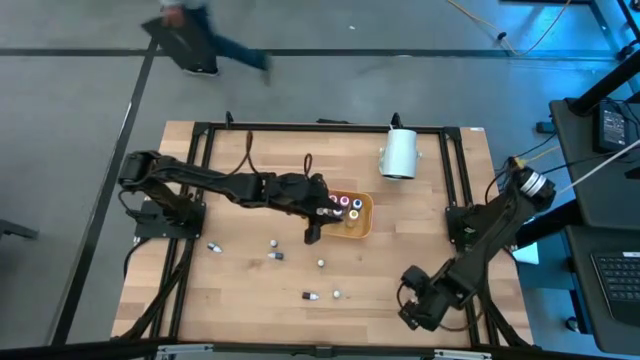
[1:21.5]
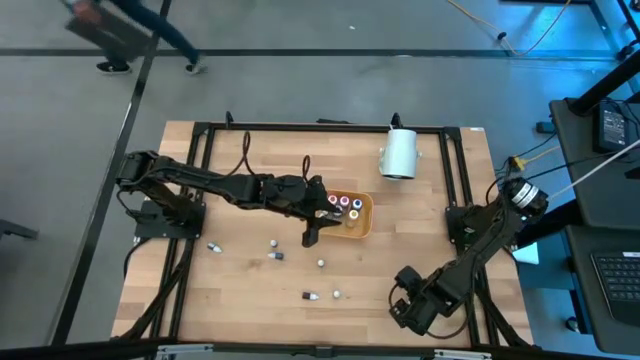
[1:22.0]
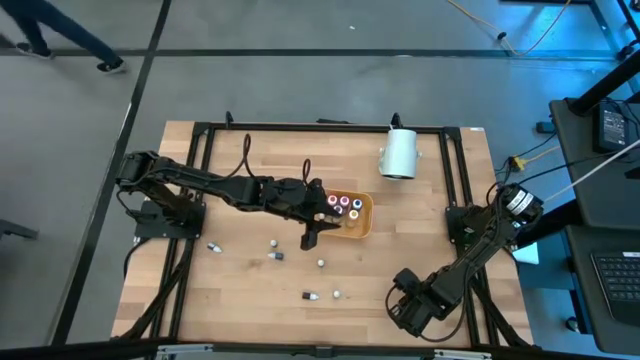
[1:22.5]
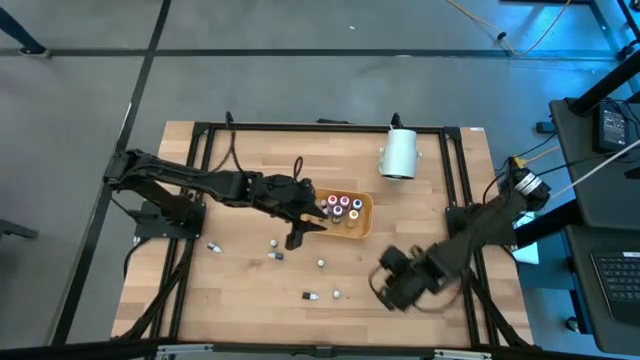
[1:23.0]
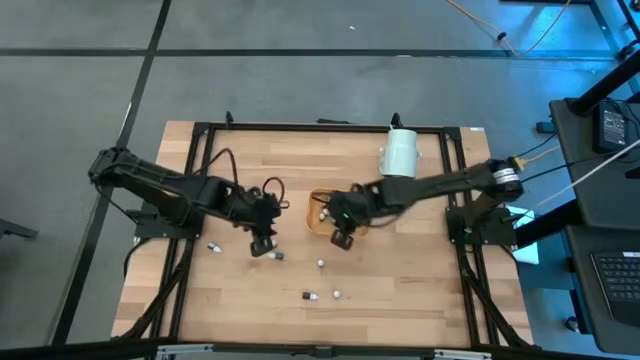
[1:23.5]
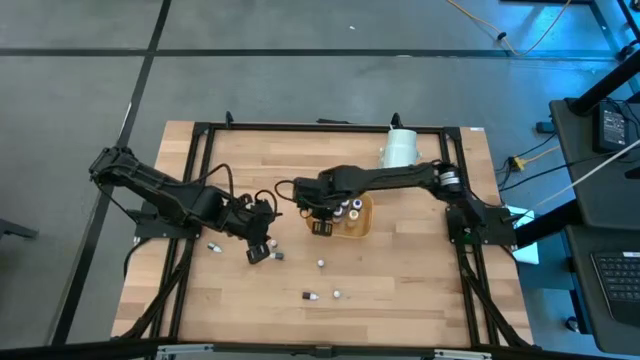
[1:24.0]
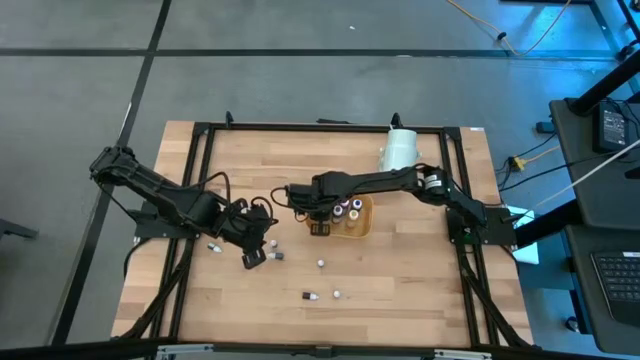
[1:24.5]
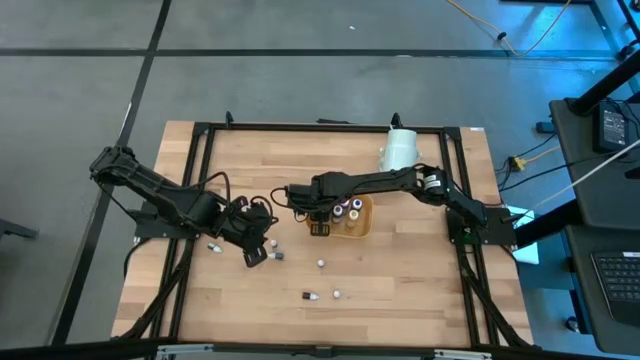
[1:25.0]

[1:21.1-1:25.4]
Task: Pick & Place food coloring
Put the small green food coloring bottle into the yellow bin

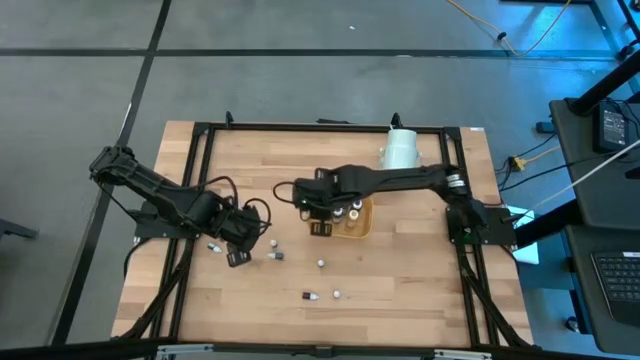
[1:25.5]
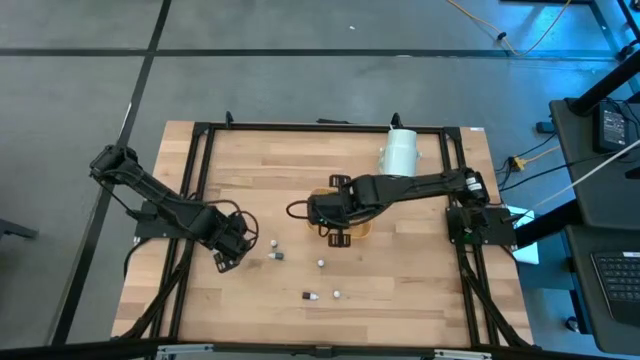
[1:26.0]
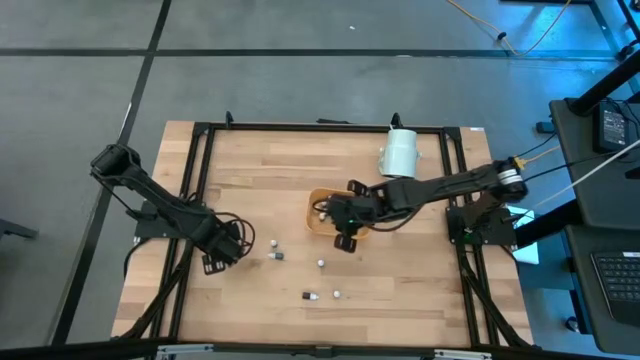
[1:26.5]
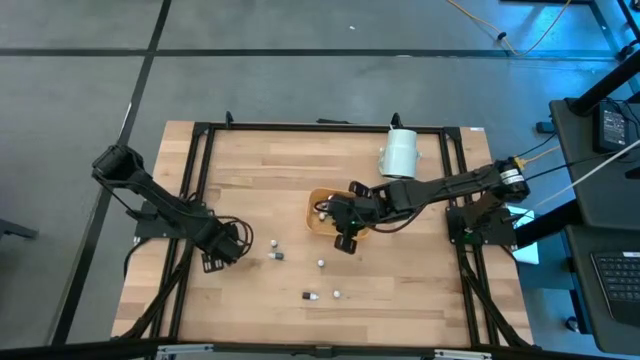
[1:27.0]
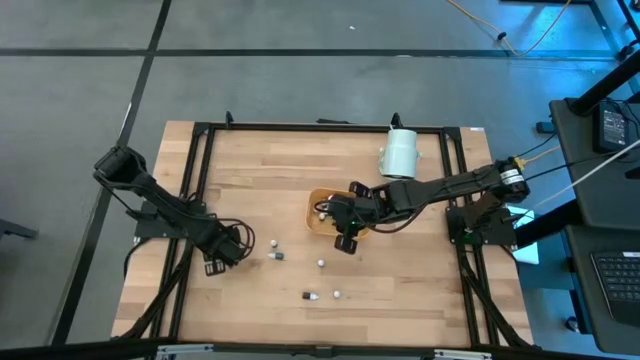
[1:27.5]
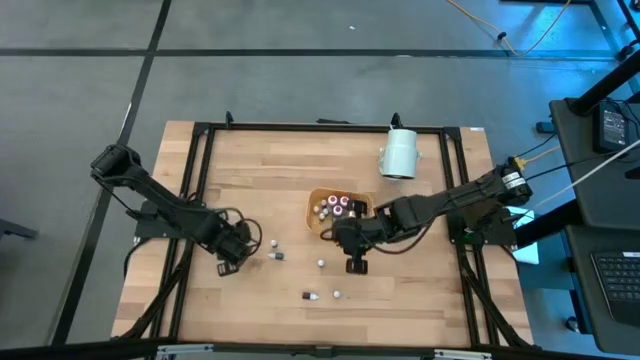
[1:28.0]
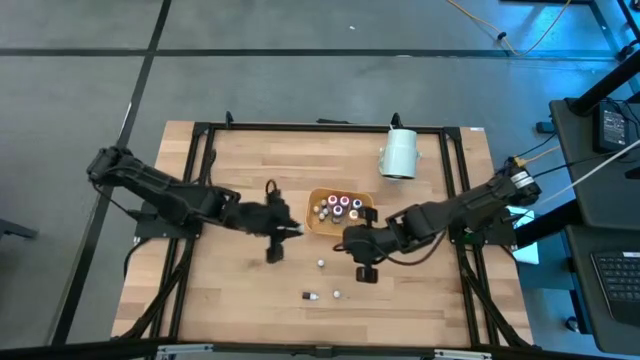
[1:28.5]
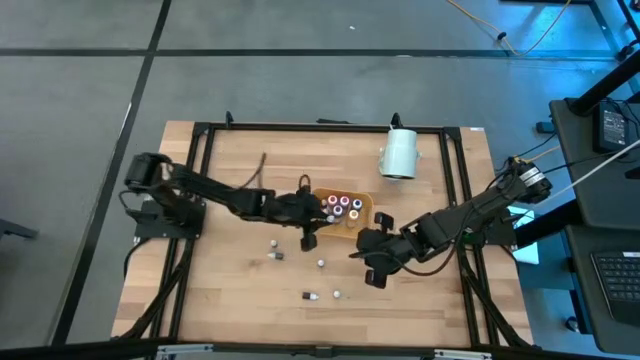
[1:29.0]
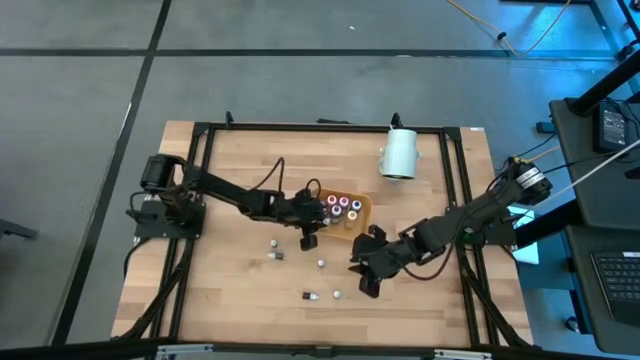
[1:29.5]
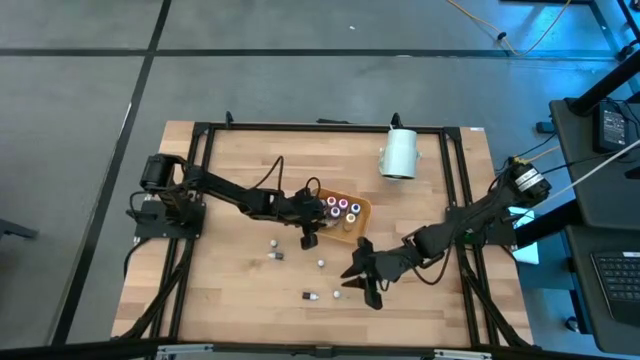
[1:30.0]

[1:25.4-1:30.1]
Put the small dark green food coloring bottle into the yellow bin

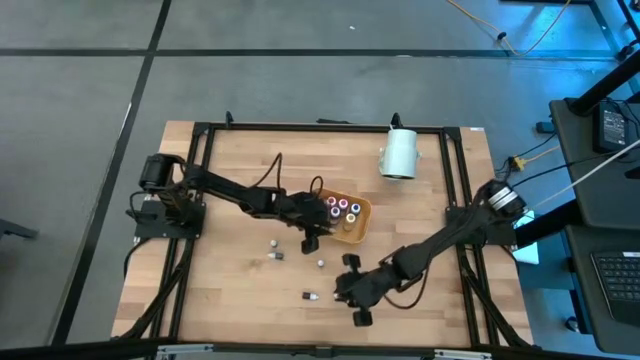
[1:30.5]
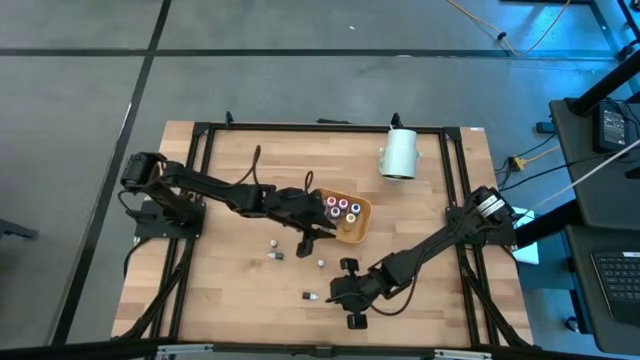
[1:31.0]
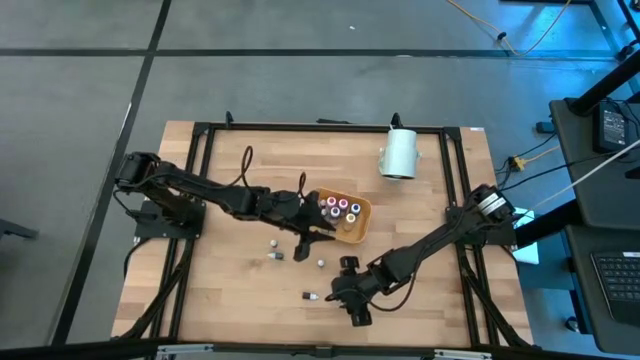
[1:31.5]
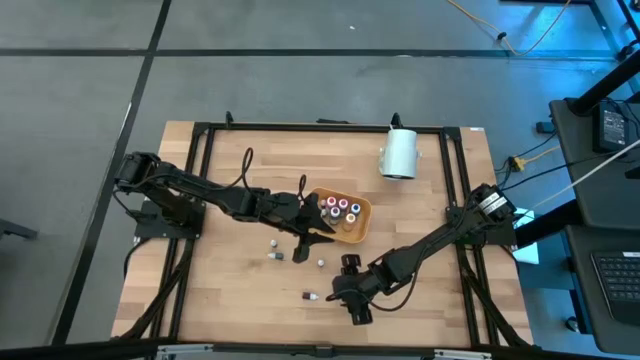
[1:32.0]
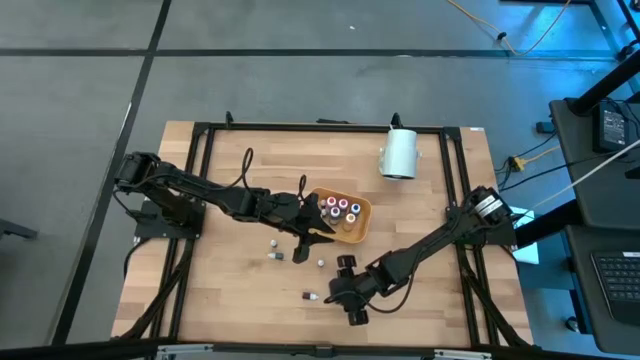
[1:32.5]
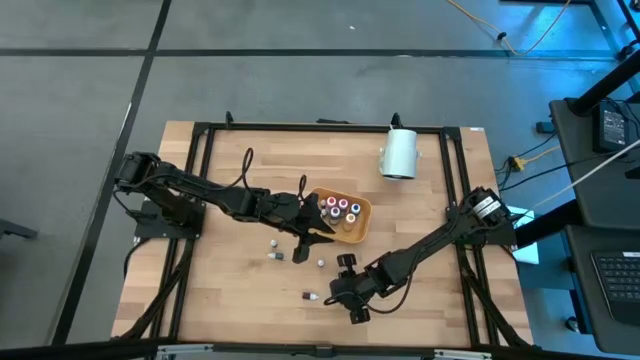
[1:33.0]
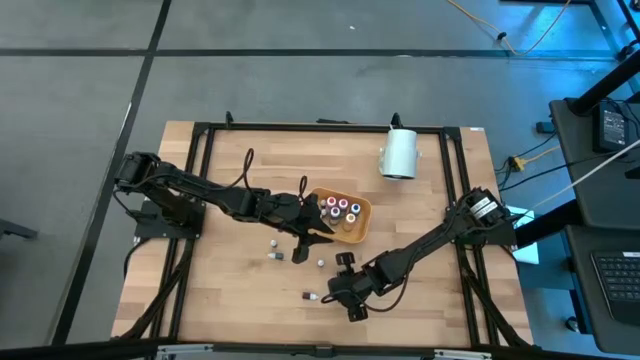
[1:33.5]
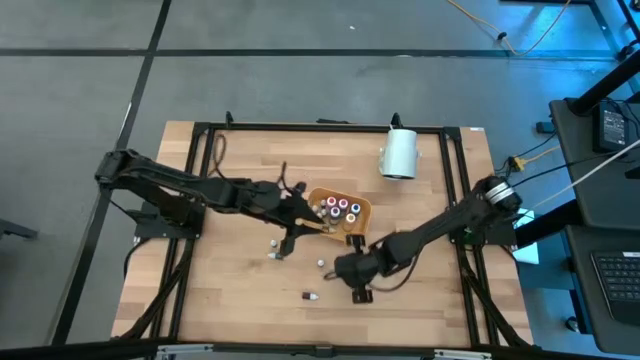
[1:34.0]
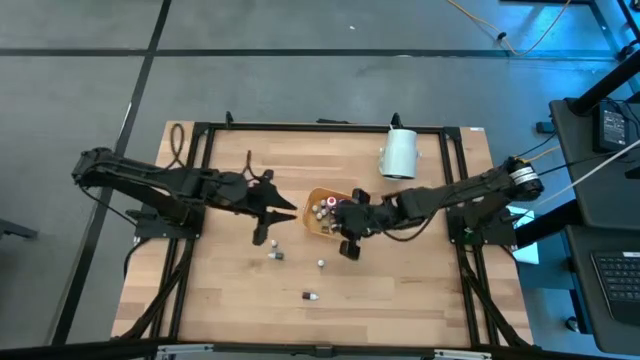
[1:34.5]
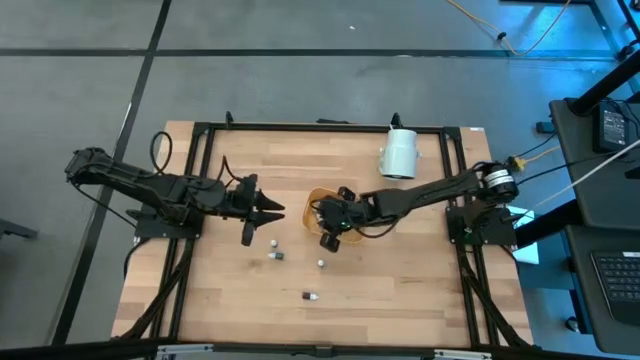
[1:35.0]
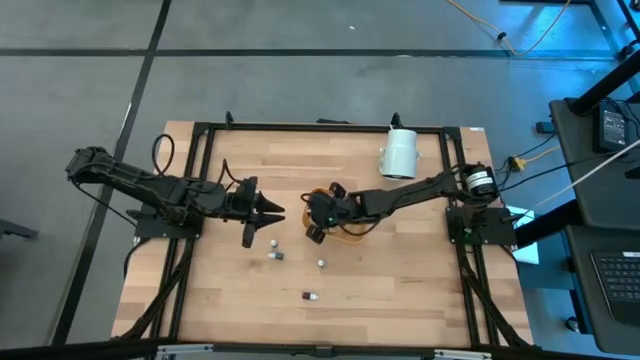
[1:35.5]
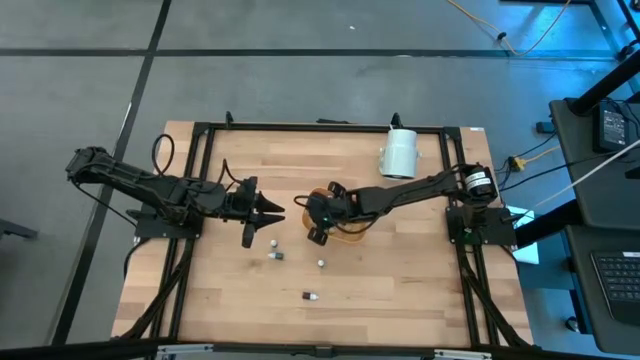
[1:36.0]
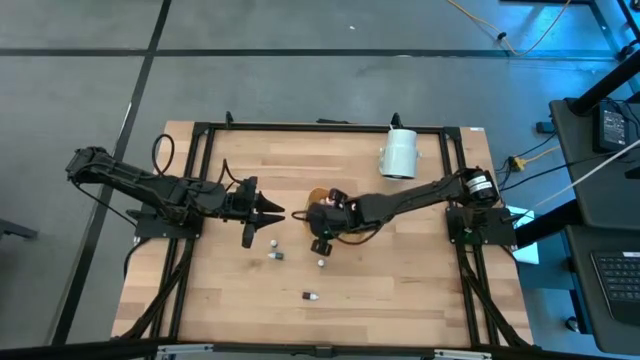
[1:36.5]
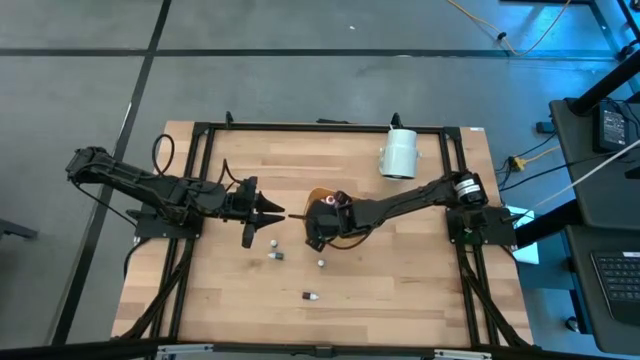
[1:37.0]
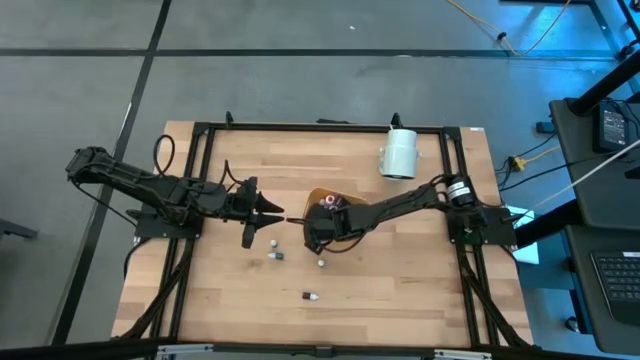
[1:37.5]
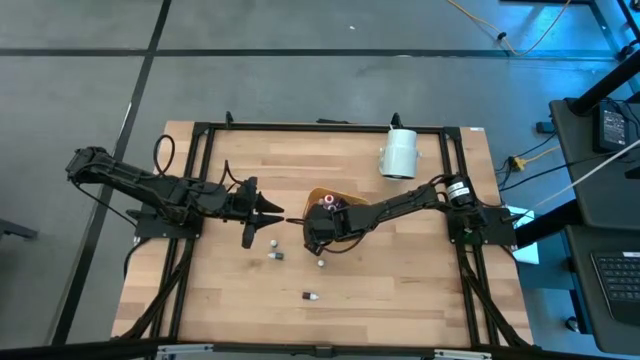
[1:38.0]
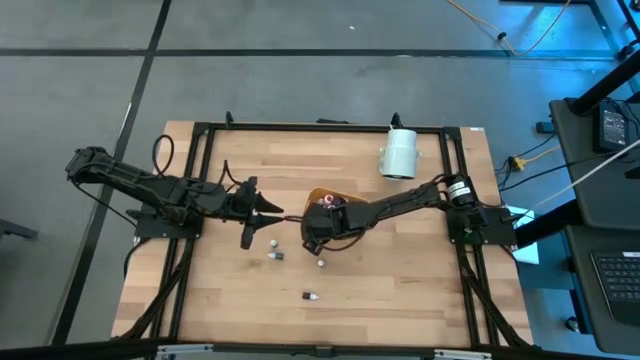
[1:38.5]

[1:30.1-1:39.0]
Put the small brown food coloring bottle into the yellow bin

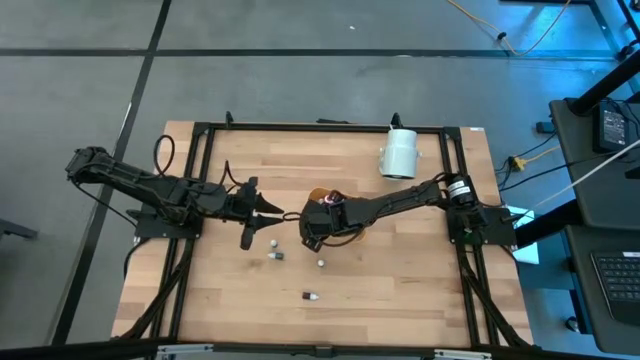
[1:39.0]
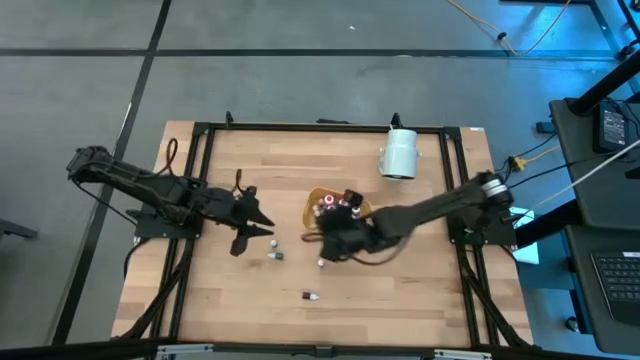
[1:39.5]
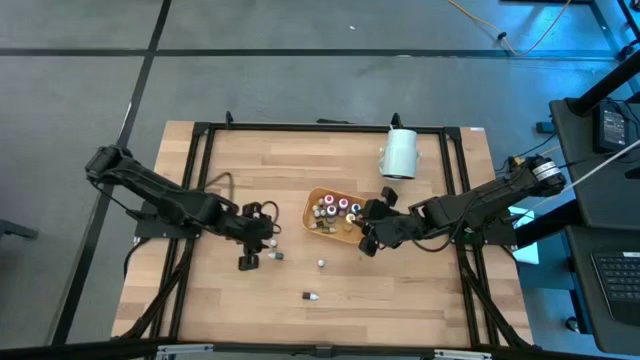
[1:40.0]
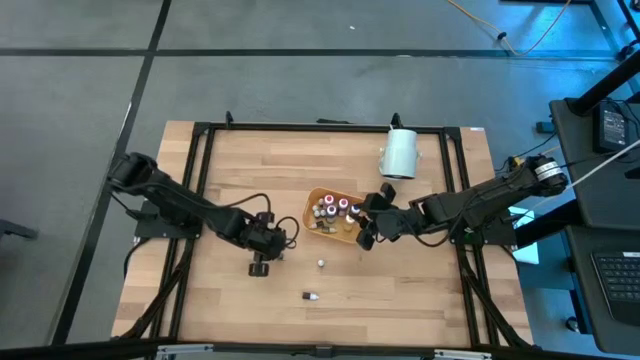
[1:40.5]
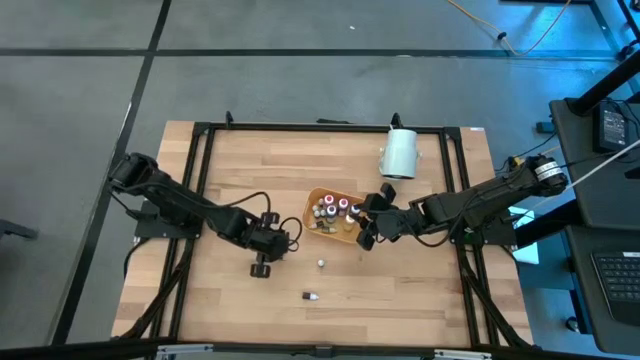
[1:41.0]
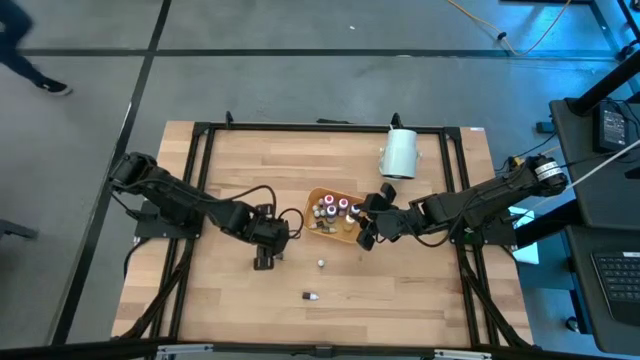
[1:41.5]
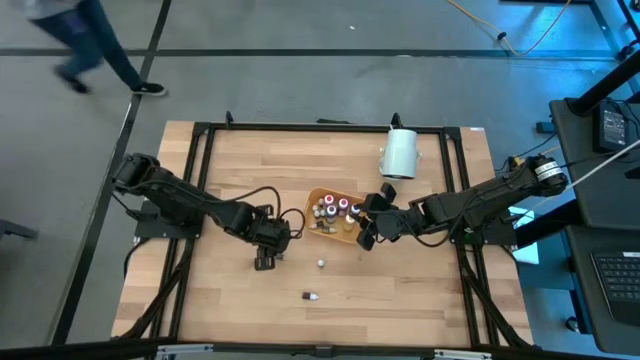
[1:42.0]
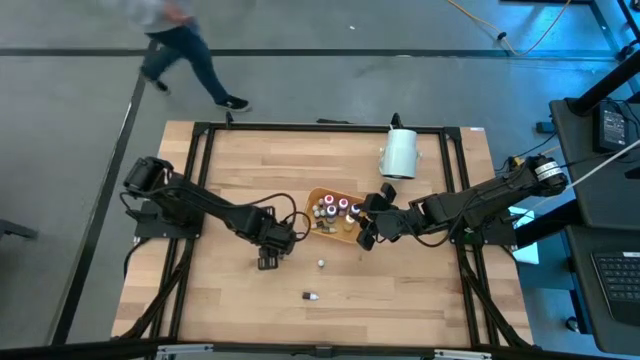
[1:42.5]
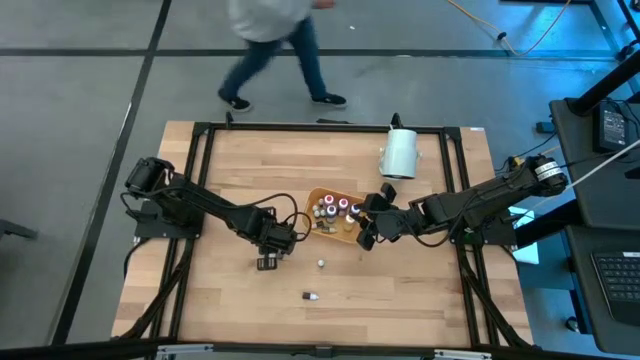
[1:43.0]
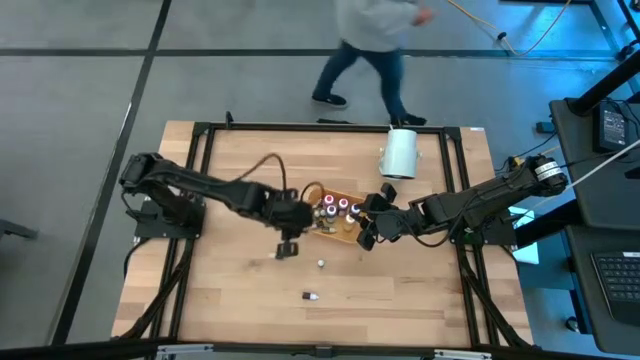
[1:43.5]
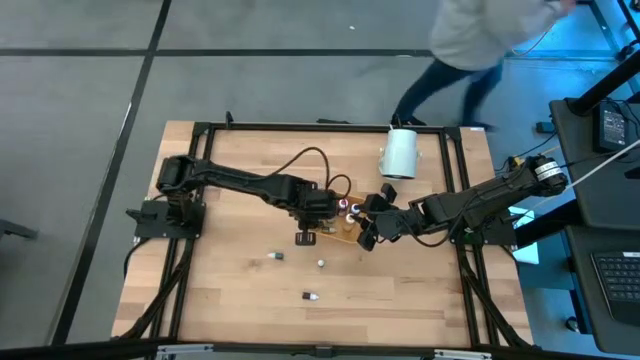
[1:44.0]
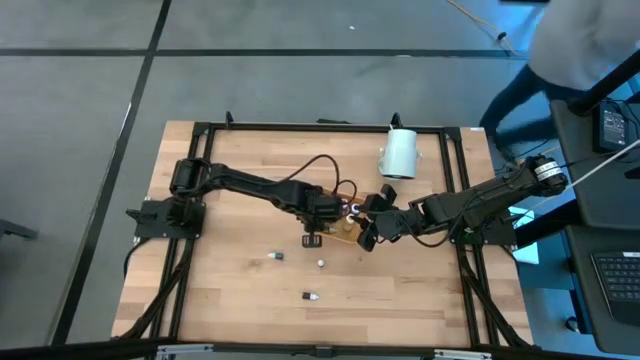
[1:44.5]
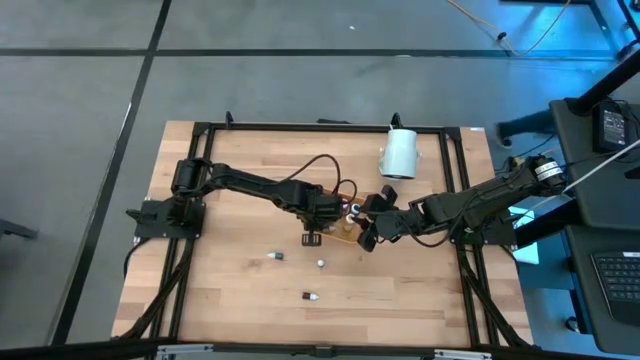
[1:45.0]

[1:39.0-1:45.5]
Put the top small red food coloring bottle into the yellow bin
